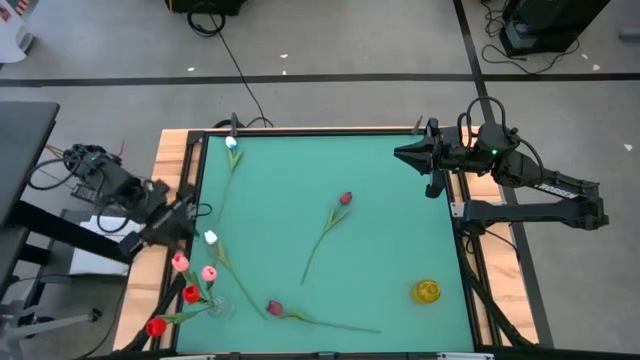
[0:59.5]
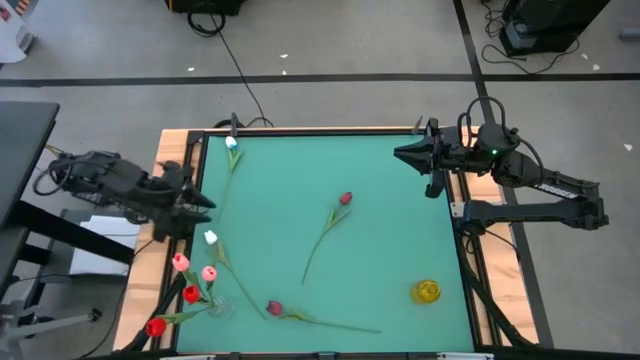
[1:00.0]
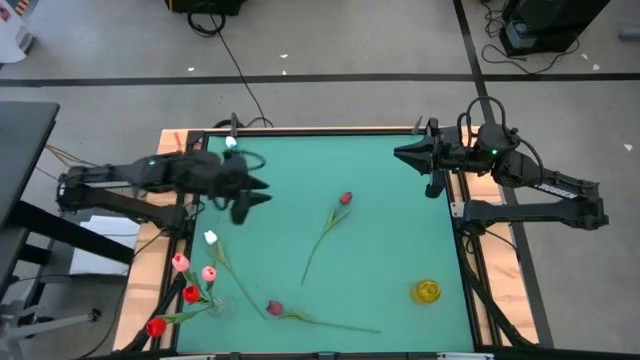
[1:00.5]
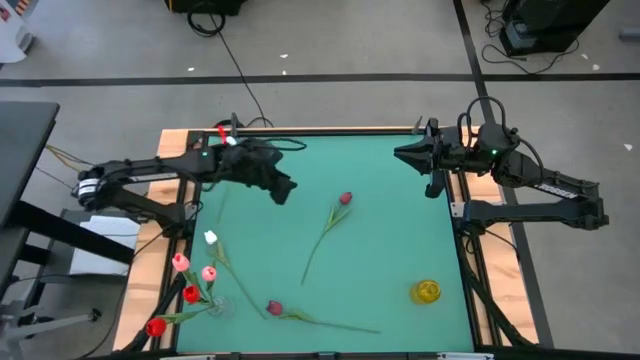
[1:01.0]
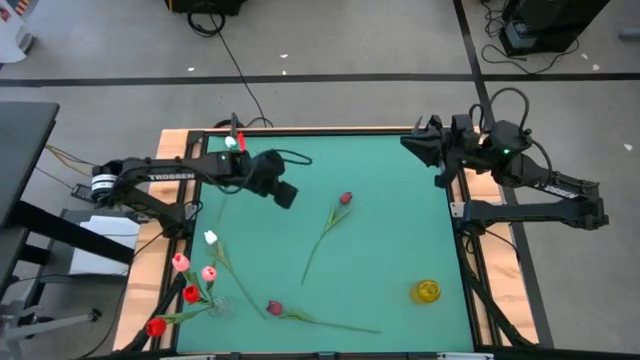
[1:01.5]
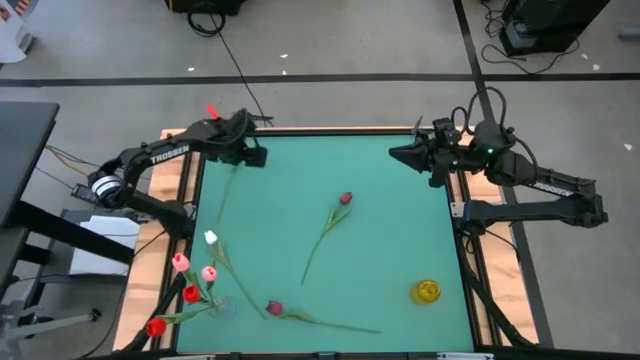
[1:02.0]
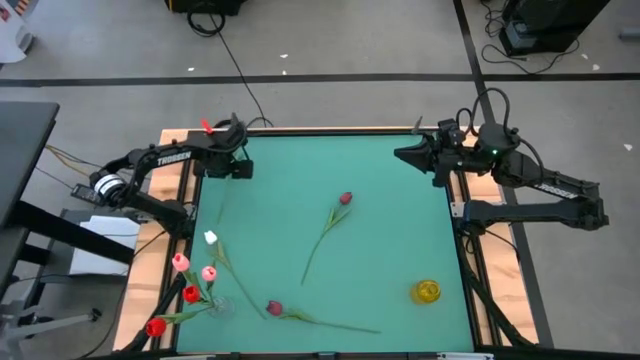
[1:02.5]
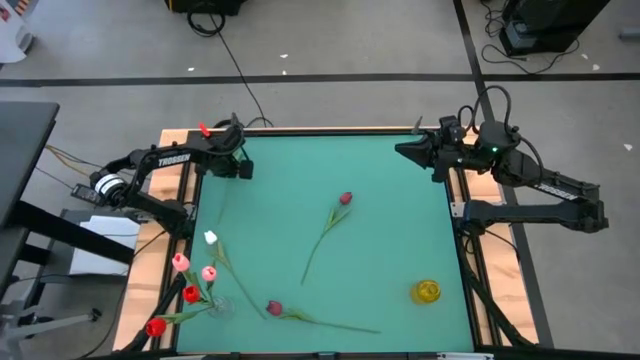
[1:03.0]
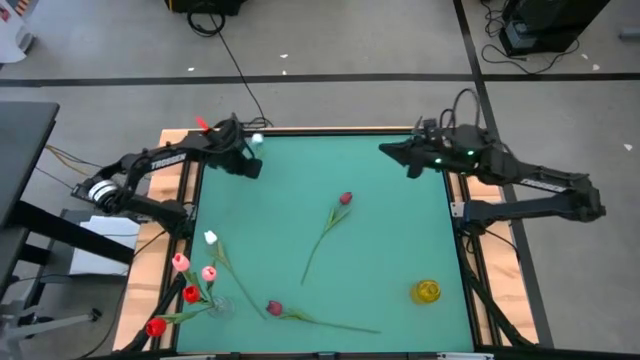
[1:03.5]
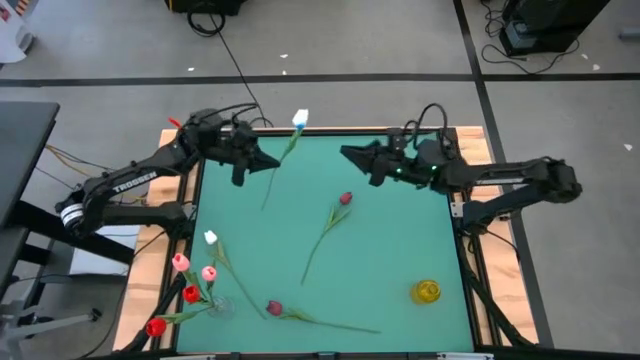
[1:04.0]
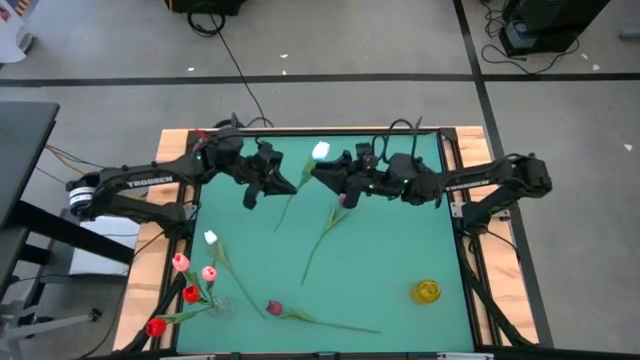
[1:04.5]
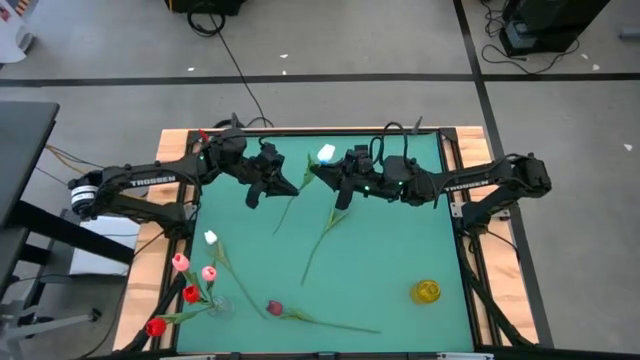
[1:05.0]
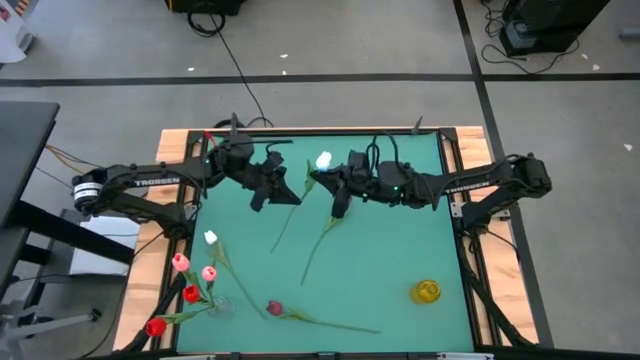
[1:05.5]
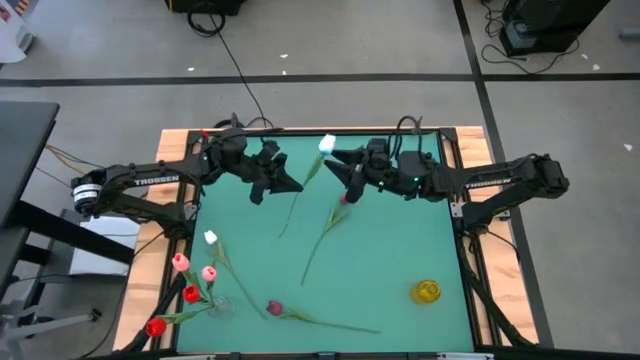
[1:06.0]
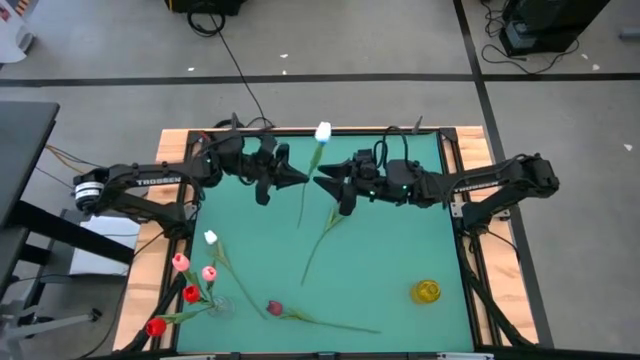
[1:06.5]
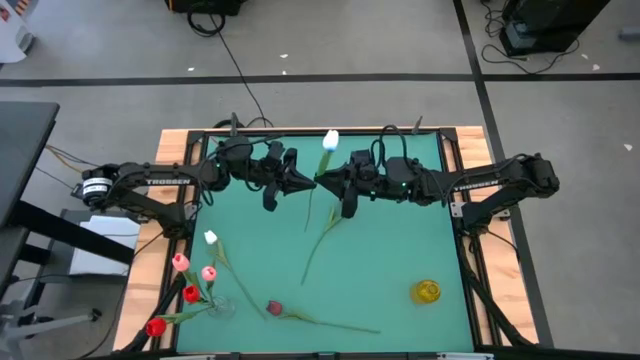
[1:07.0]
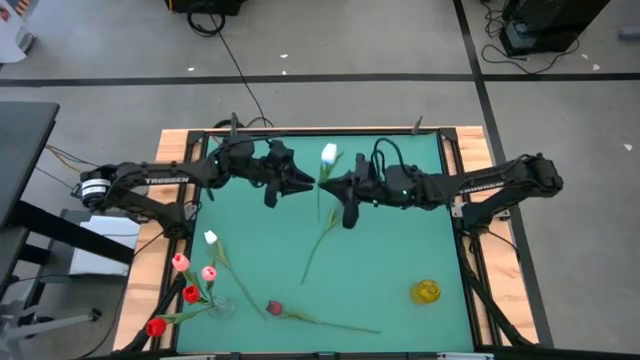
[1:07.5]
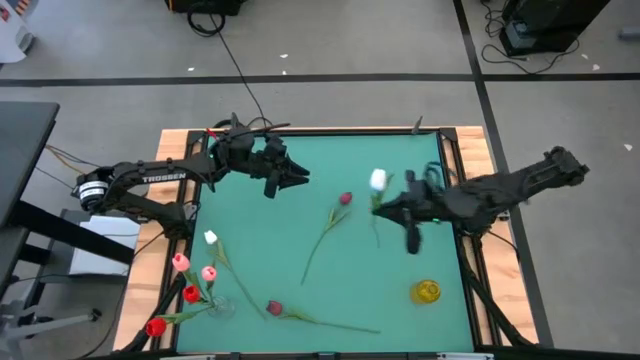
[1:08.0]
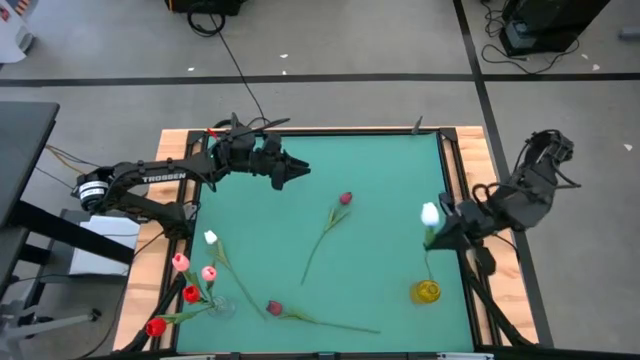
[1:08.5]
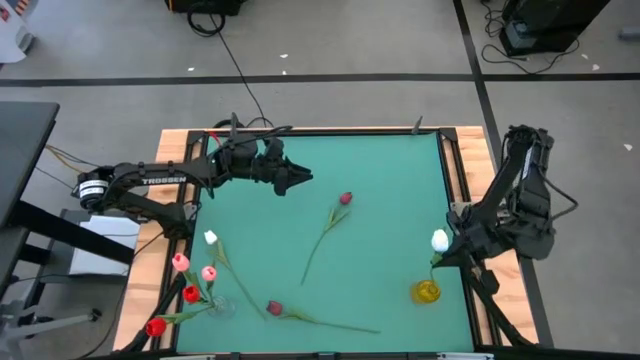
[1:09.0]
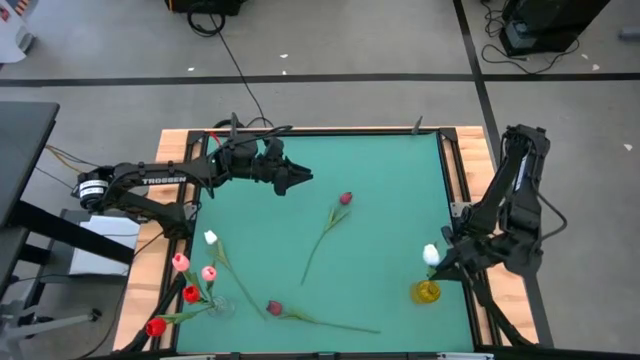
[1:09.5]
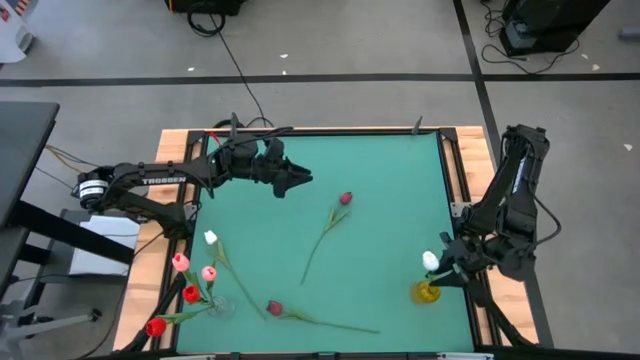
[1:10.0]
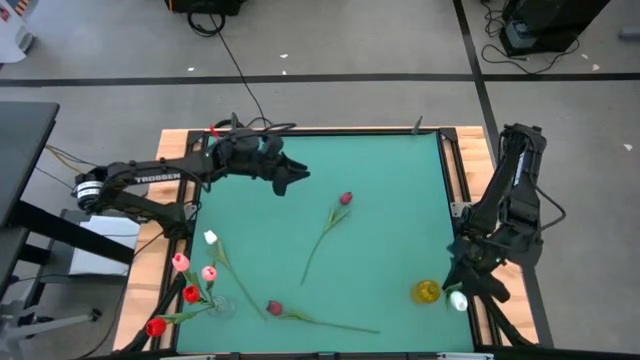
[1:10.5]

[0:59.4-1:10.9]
Task: Sort flowers into vase by color
Put the top white tulip into the yellow transparent vase

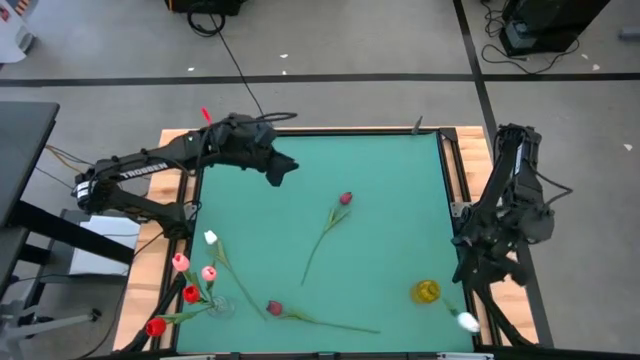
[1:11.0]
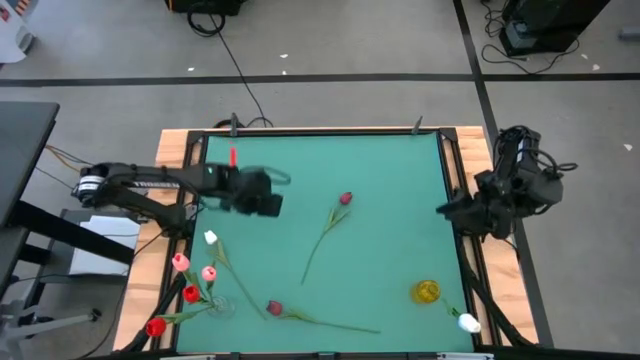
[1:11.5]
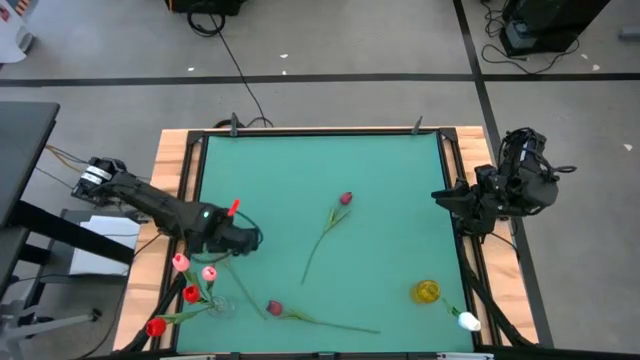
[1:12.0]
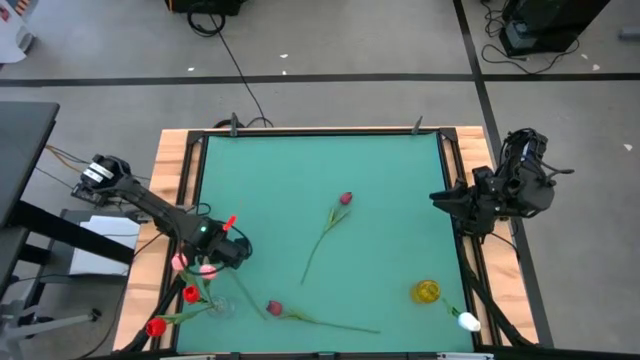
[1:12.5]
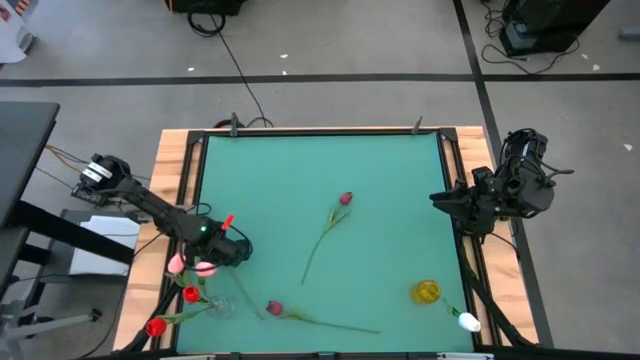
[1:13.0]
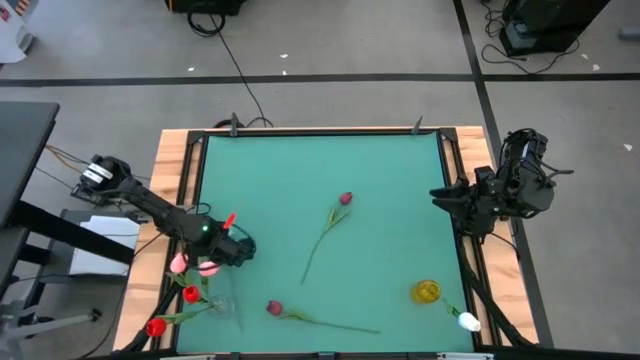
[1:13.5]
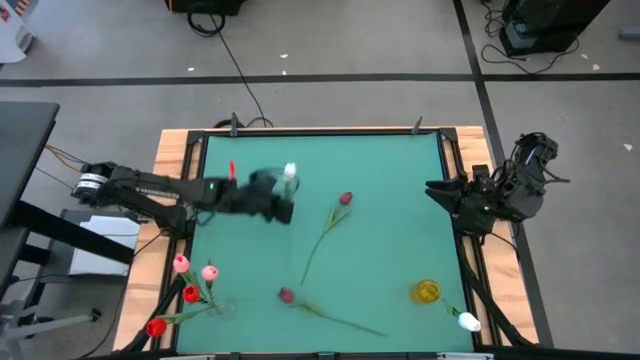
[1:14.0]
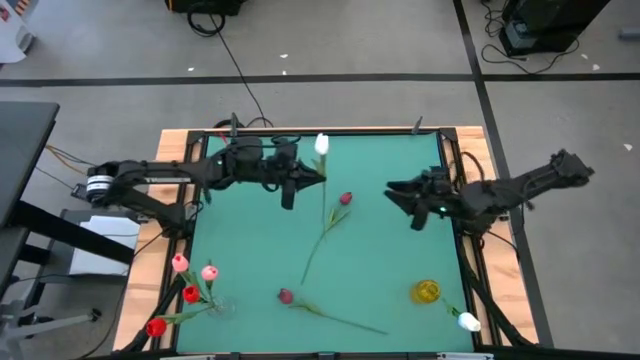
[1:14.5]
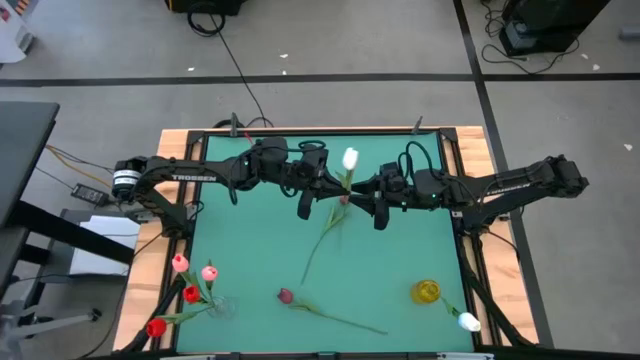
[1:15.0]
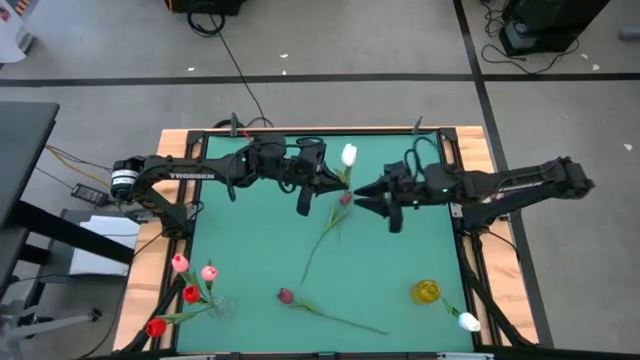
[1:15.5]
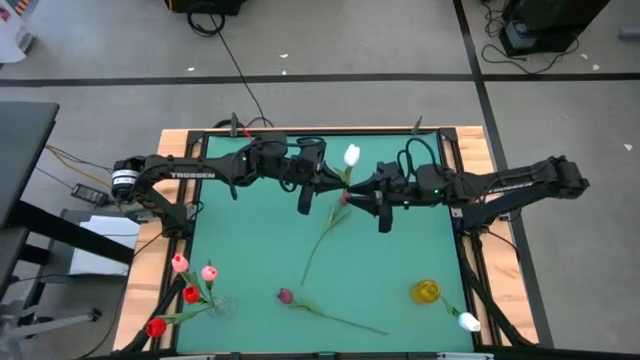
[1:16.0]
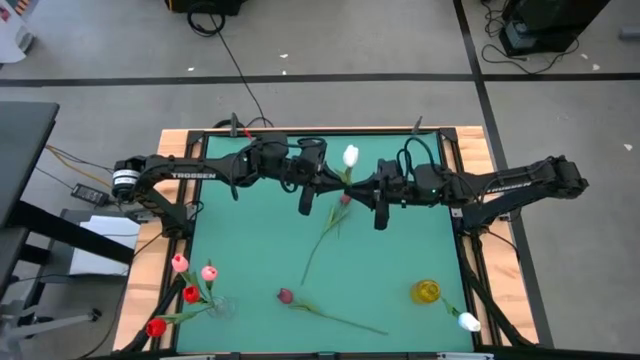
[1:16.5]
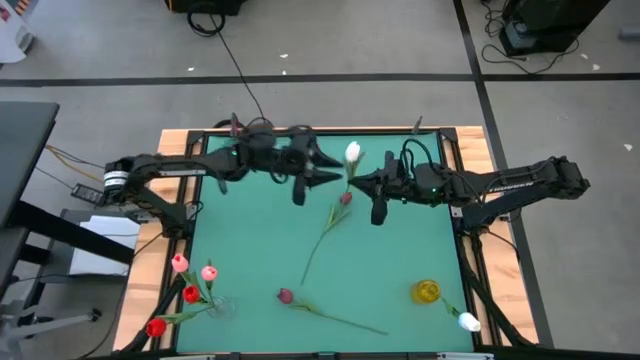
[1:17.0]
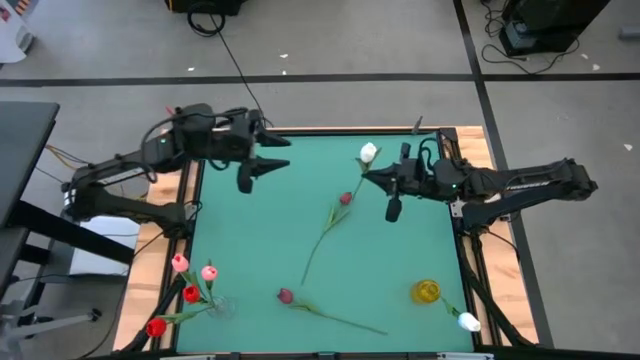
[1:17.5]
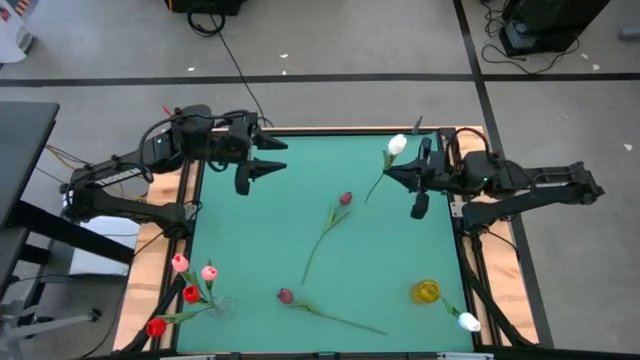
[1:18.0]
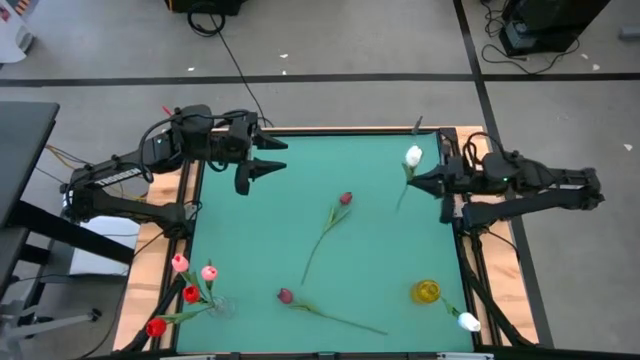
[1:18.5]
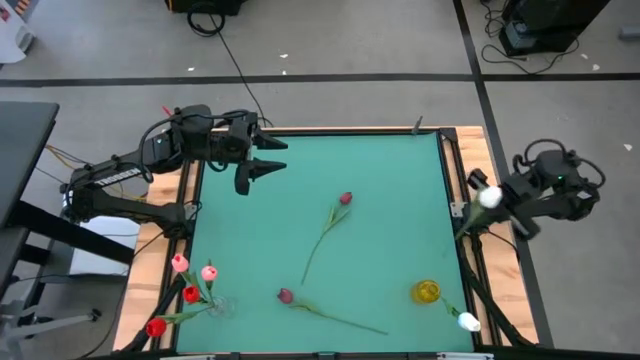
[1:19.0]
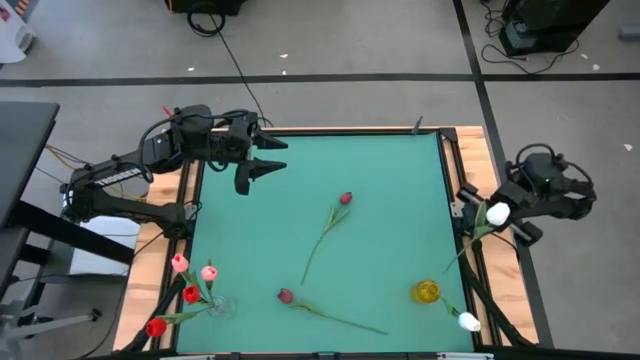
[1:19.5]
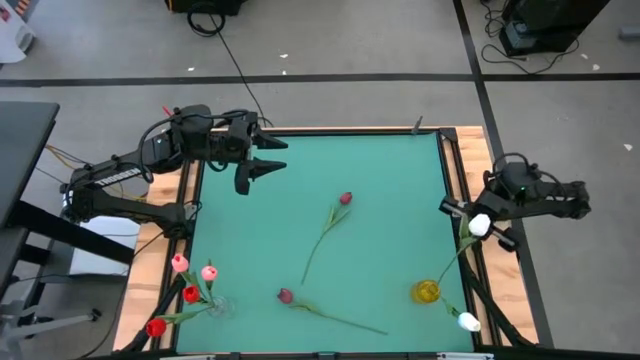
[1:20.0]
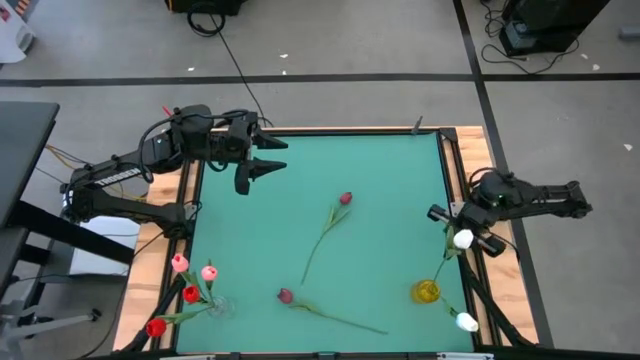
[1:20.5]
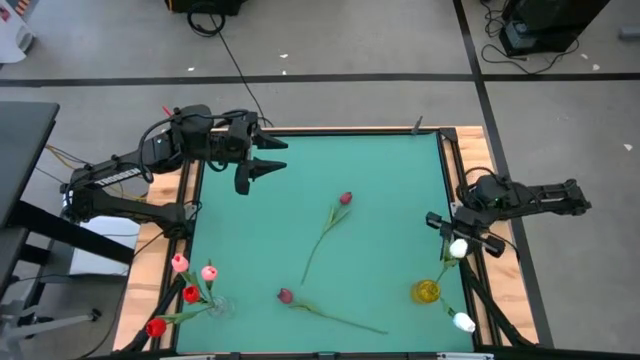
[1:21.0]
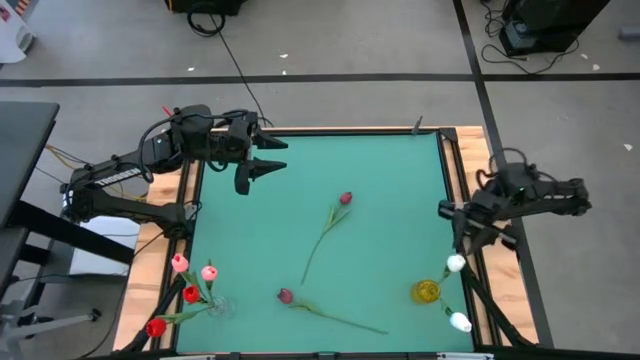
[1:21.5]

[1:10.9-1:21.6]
Put the white flower into the yellow transparent vase
